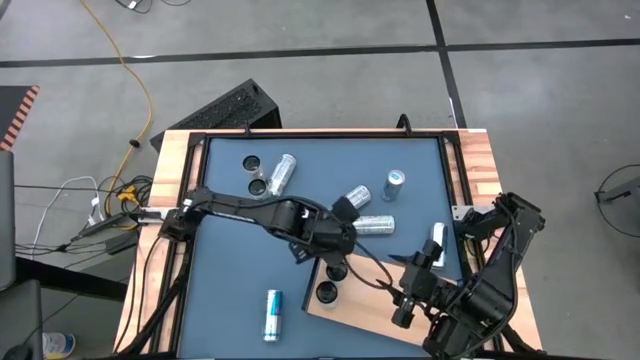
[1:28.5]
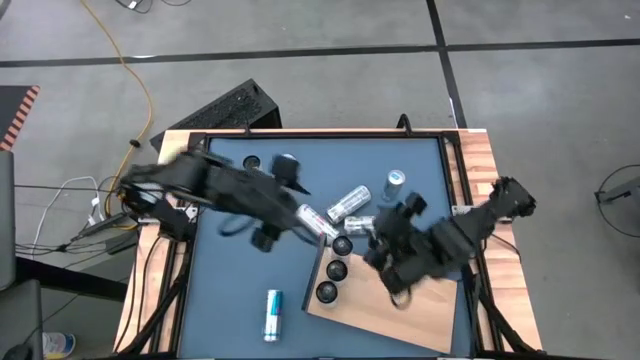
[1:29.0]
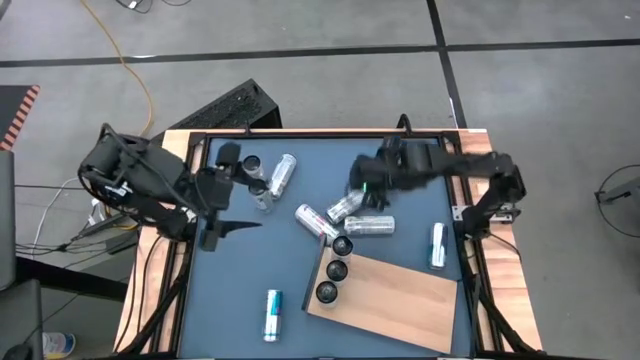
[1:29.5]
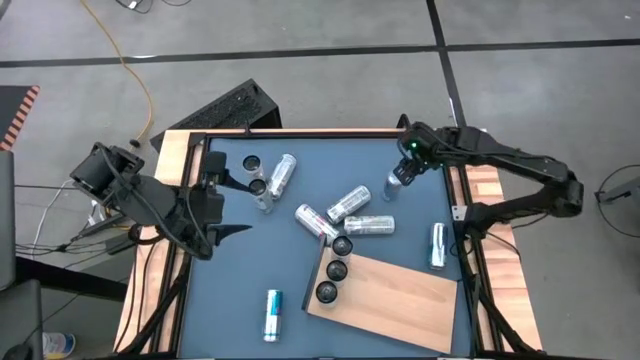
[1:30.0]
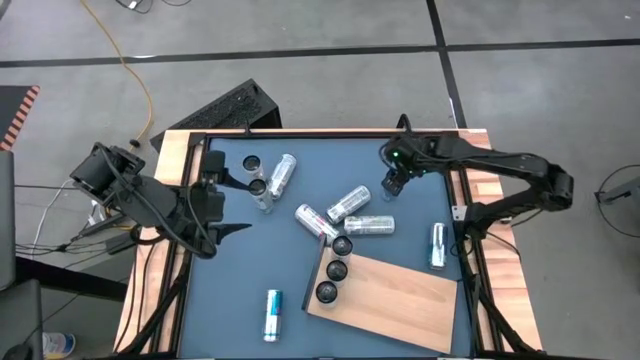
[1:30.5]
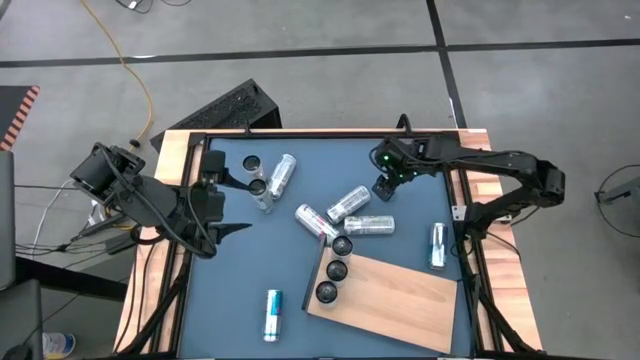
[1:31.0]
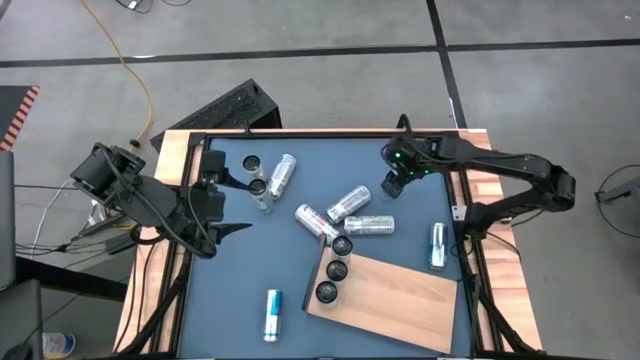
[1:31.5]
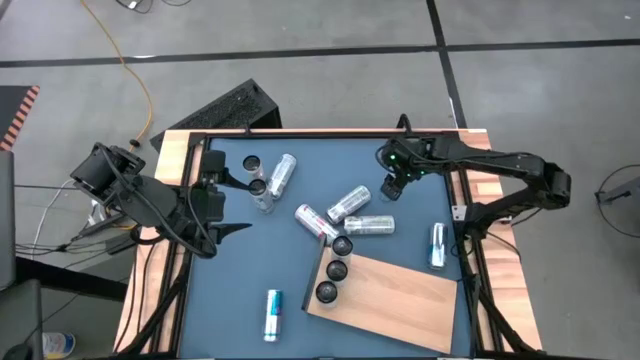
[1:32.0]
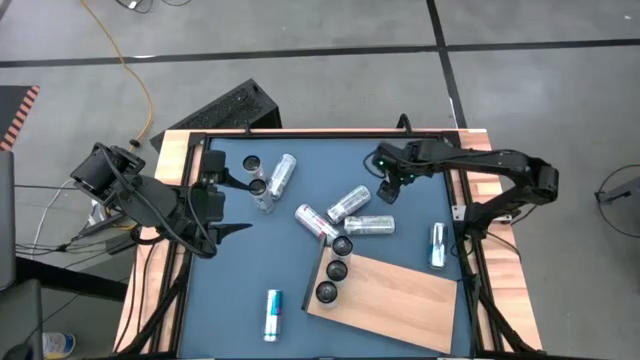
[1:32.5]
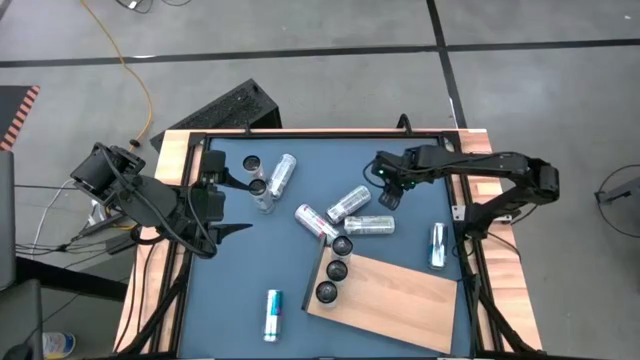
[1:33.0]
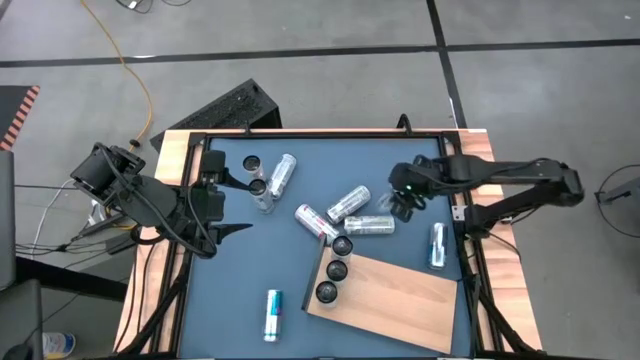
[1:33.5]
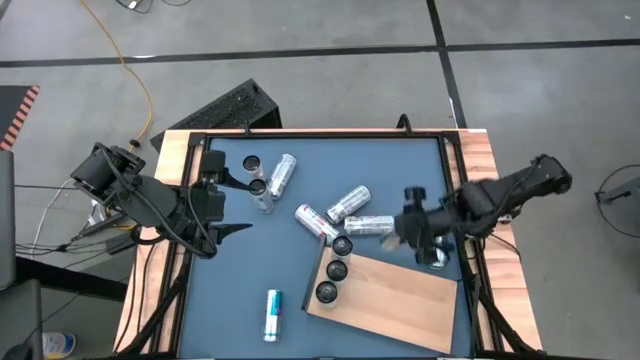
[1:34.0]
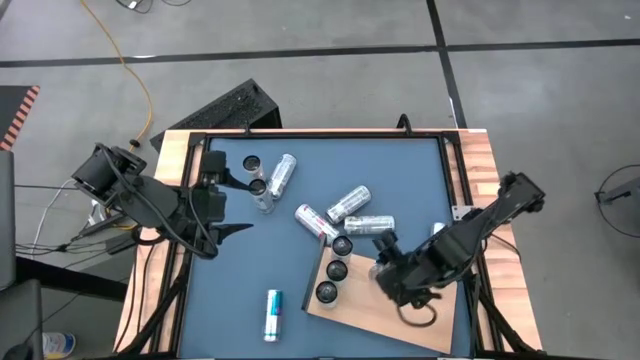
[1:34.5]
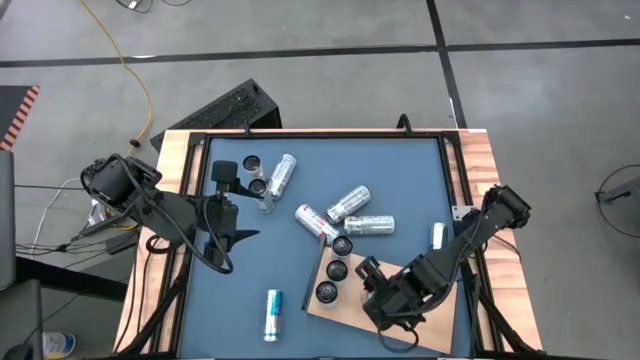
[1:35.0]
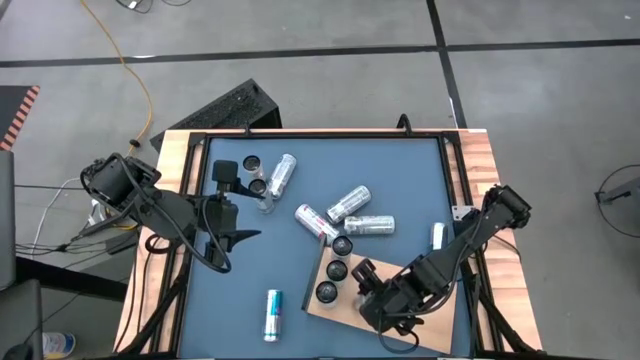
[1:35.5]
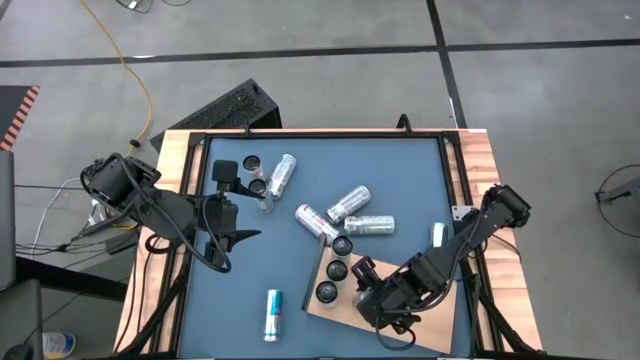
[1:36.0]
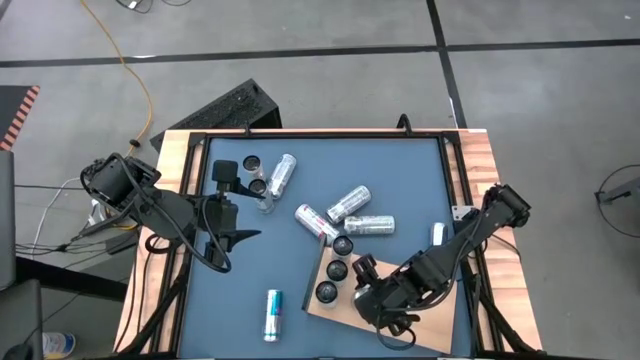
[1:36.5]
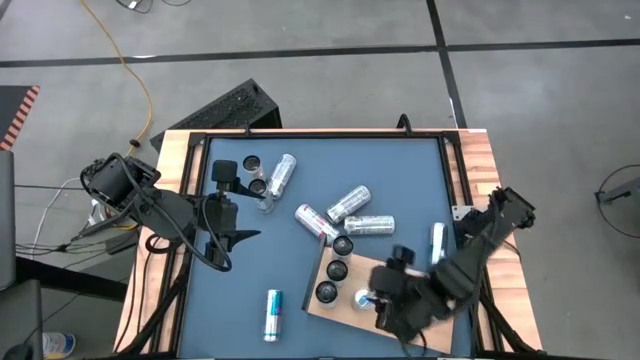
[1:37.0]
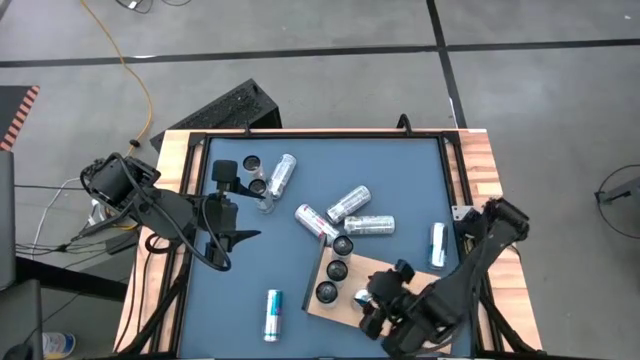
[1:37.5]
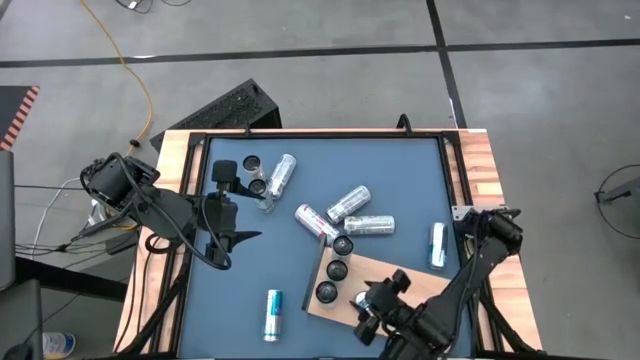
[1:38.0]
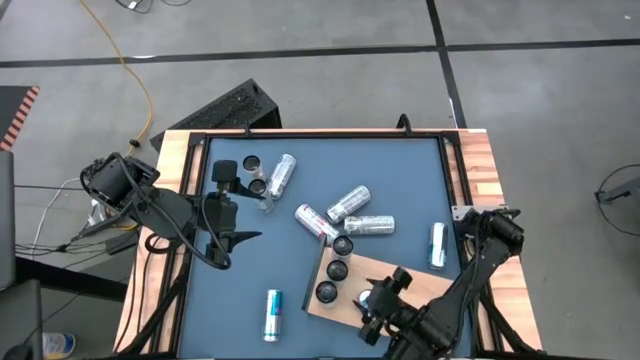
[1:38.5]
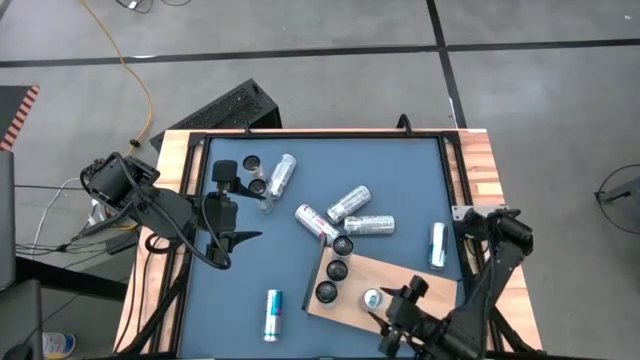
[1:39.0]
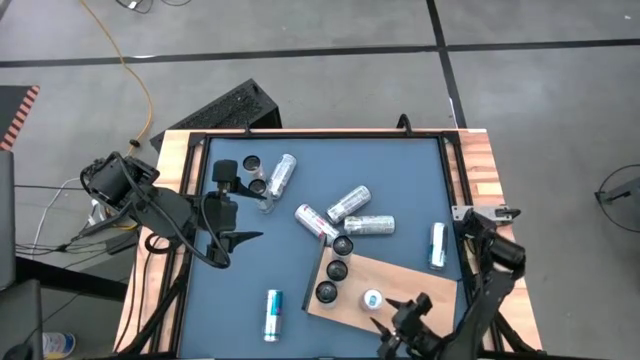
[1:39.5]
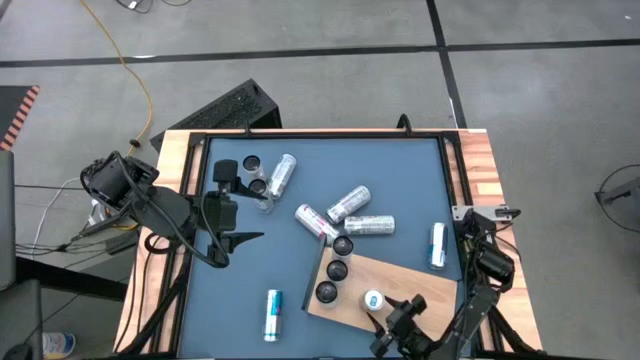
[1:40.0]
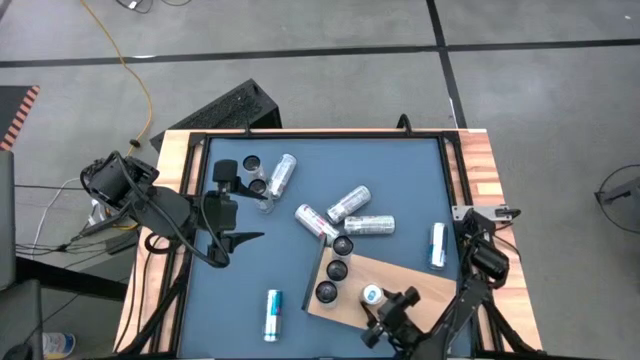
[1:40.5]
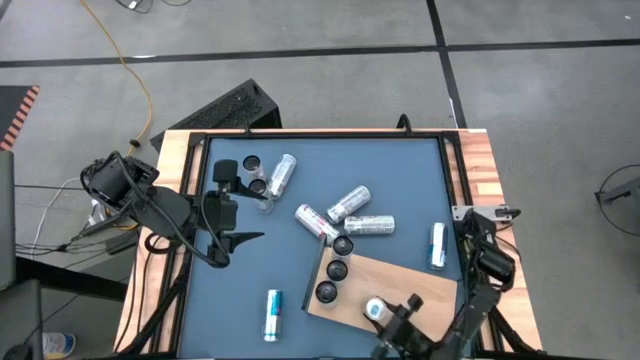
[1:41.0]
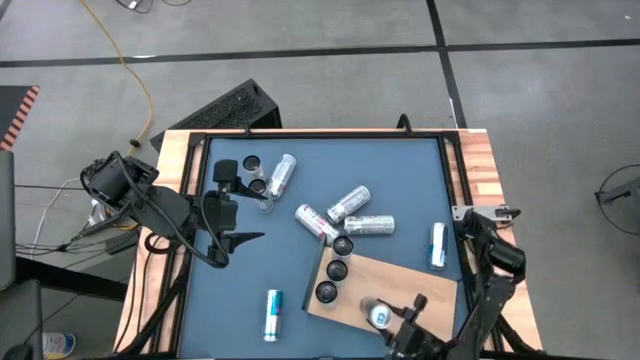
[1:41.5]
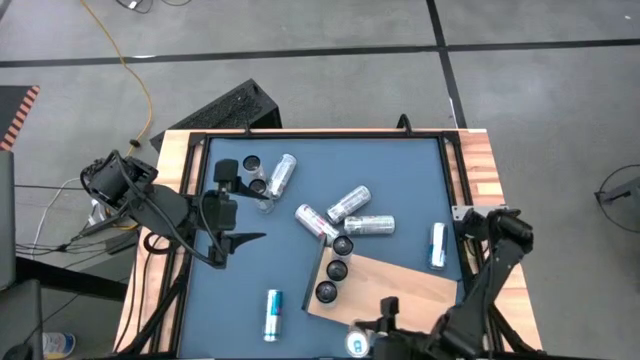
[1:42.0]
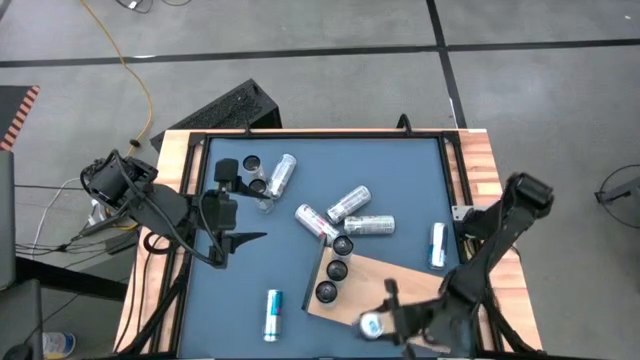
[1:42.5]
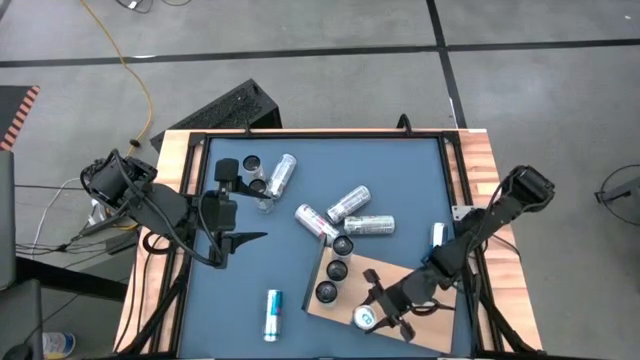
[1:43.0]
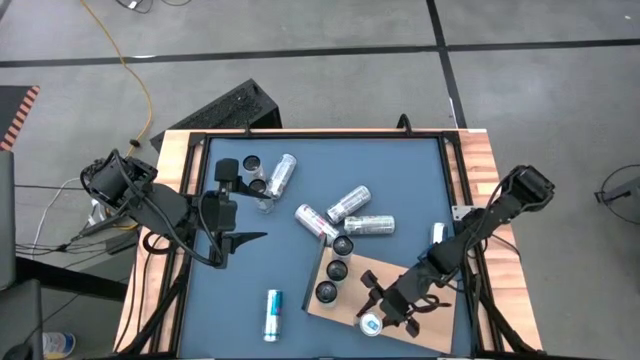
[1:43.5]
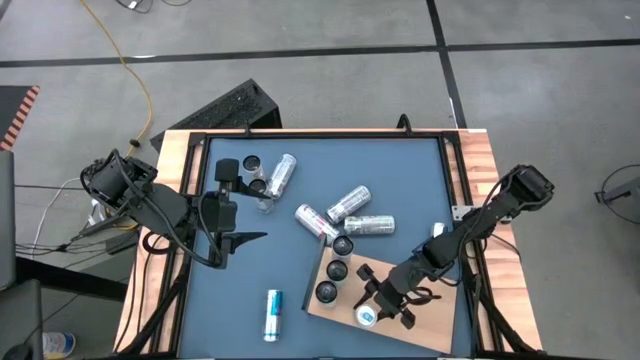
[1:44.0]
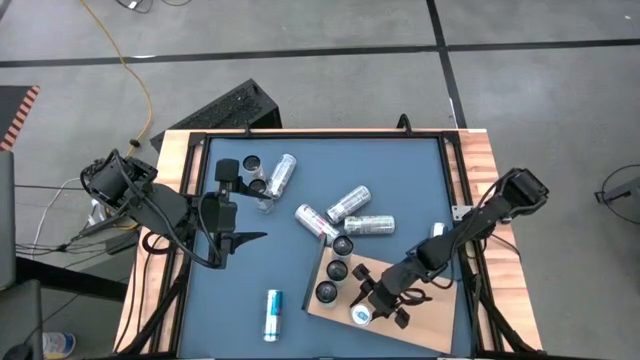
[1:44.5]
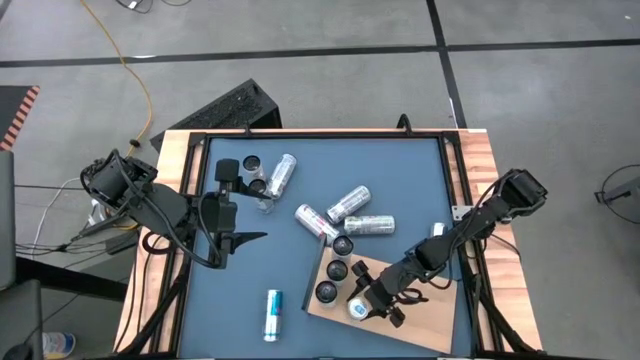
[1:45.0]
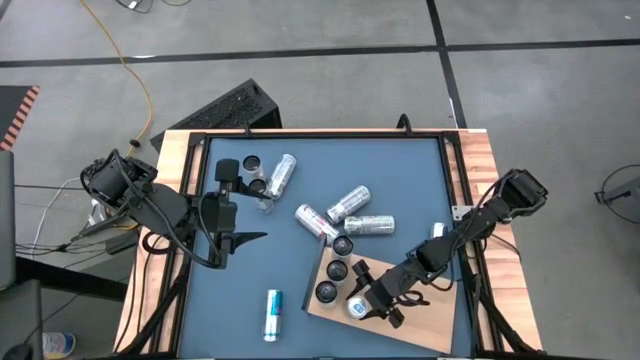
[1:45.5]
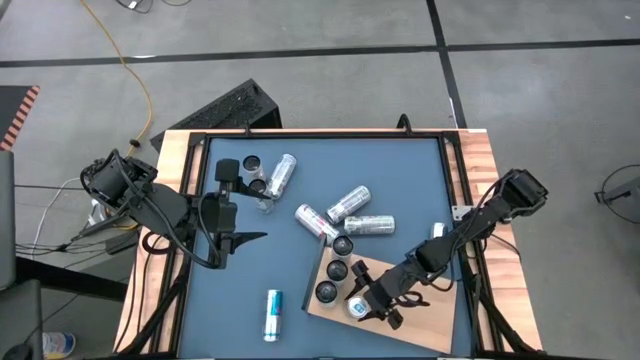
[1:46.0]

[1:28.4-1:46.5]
Task: Place canned beverage on shelf
Put the top blue soda can on the shelf

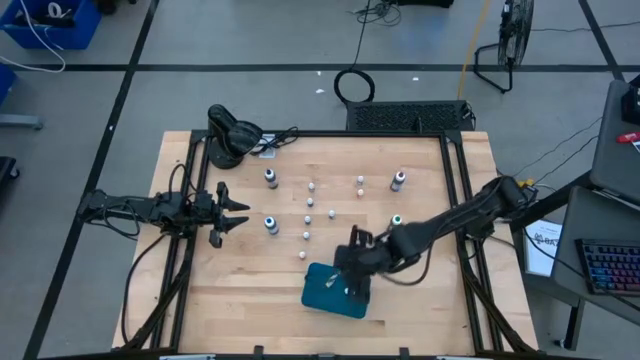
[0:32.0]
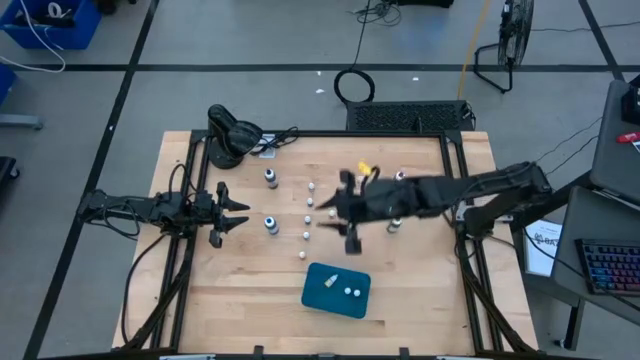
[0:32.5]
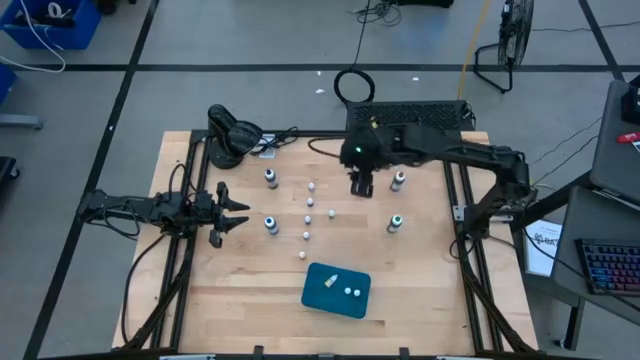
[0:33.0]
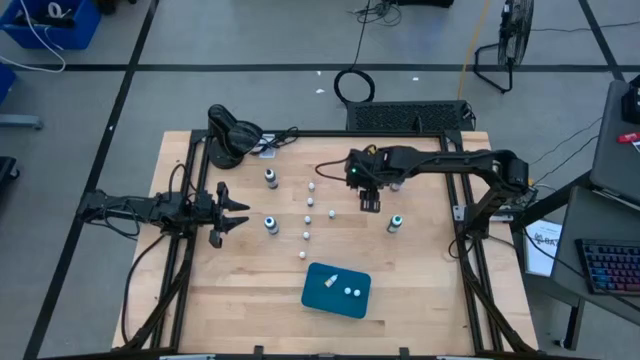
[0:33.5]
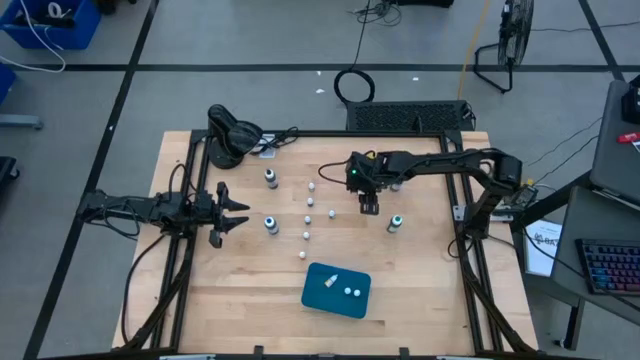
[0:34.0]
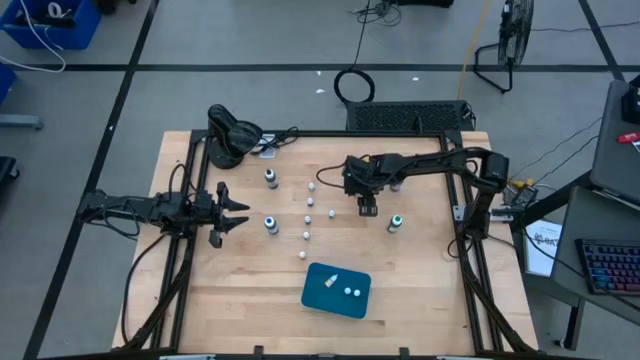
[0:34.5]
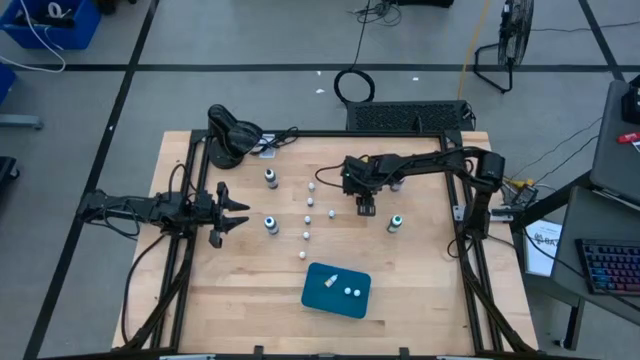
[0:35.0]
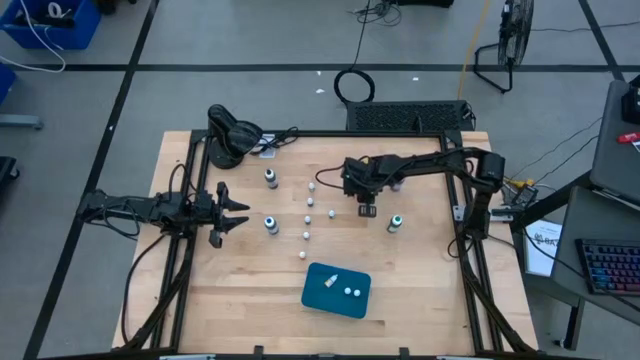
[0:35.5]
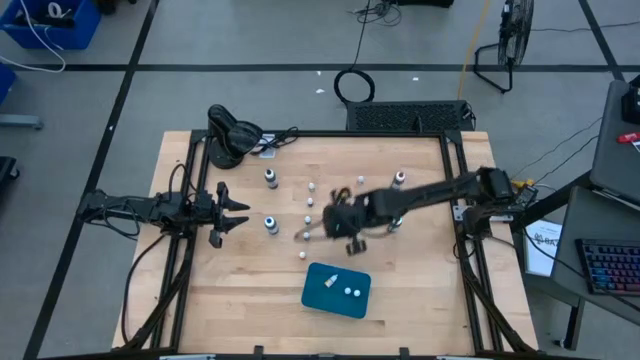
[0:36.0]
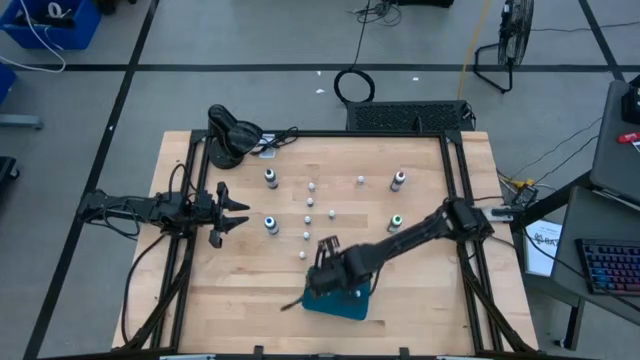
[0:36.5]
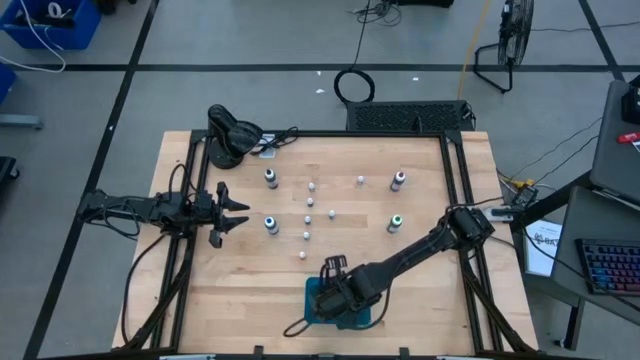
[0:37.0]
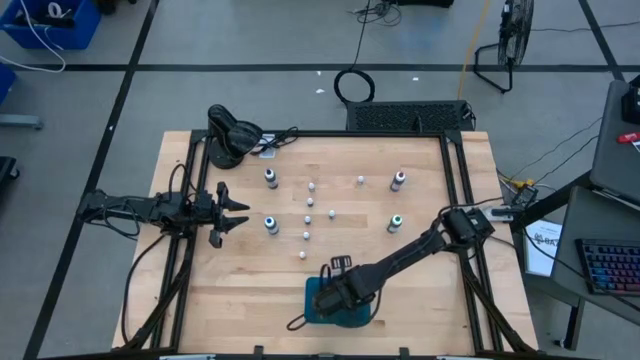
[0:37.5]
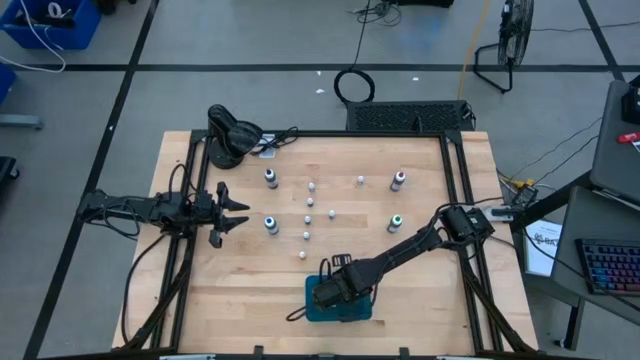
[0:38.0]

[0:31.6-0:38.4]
Task: Pick & Place food coloring
Put the small yellow coloring bottle into the blue bin
